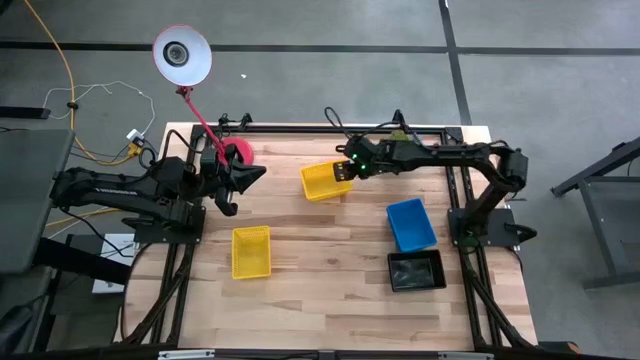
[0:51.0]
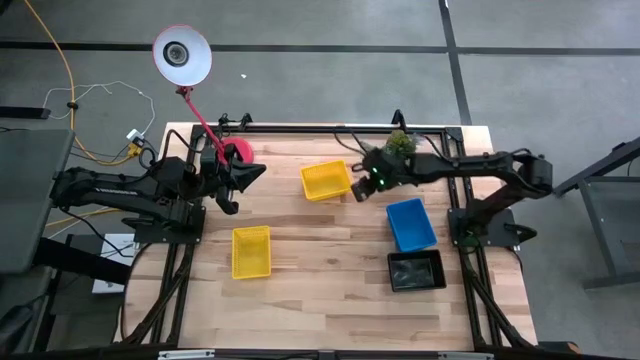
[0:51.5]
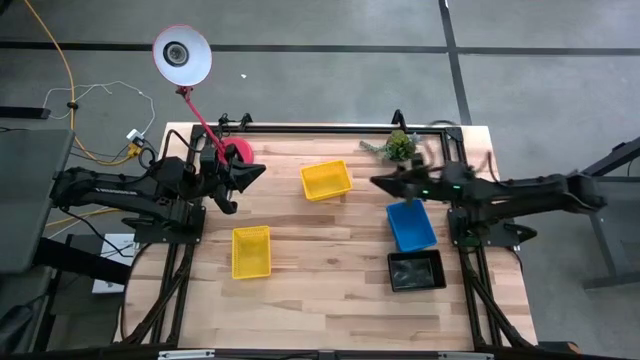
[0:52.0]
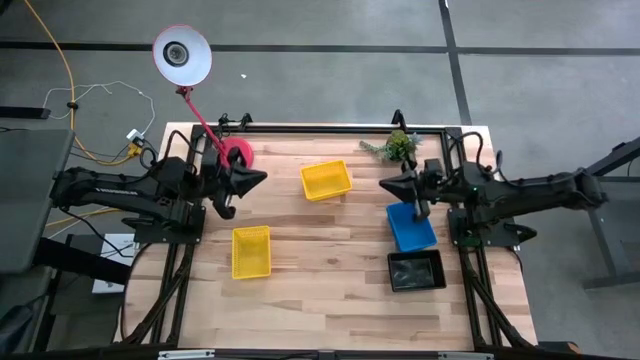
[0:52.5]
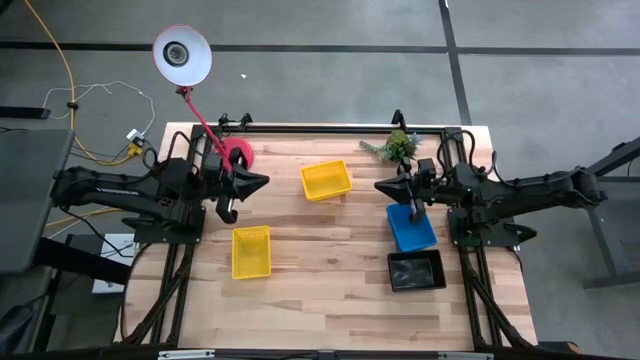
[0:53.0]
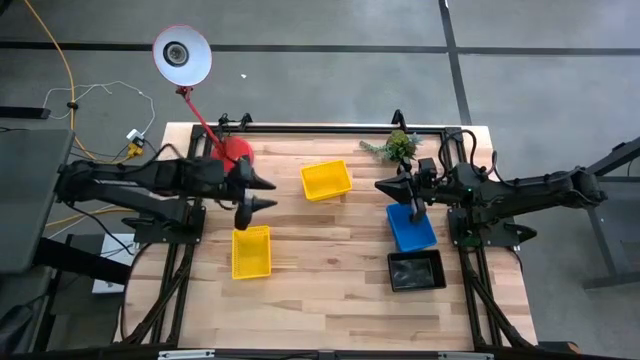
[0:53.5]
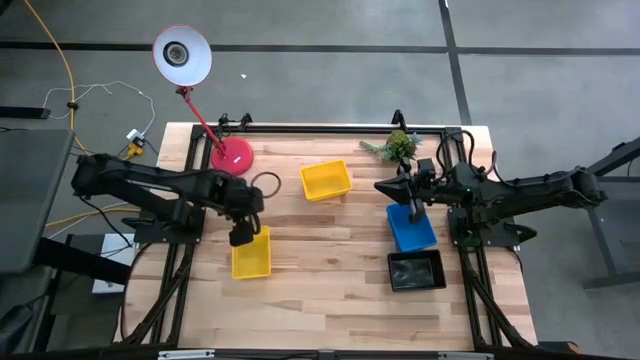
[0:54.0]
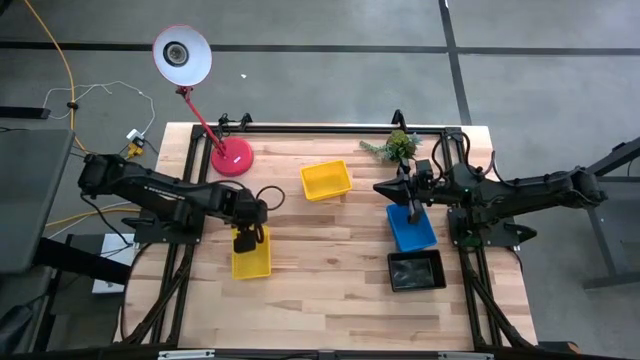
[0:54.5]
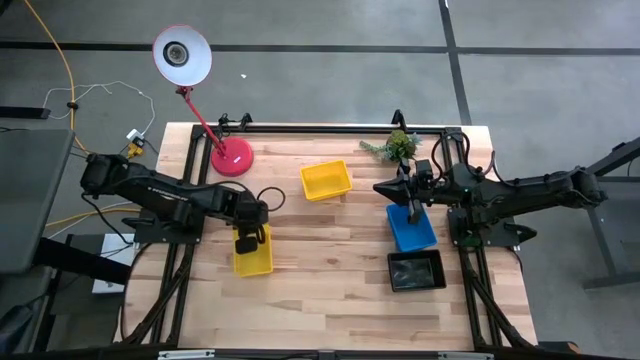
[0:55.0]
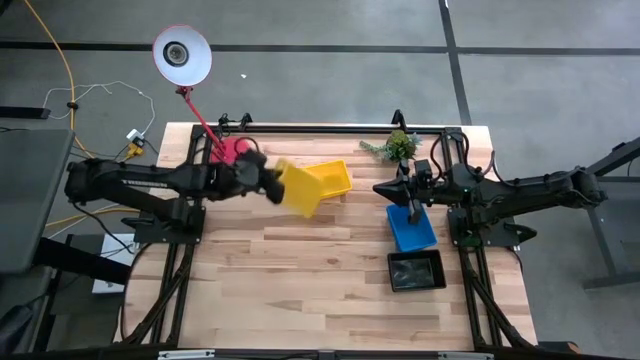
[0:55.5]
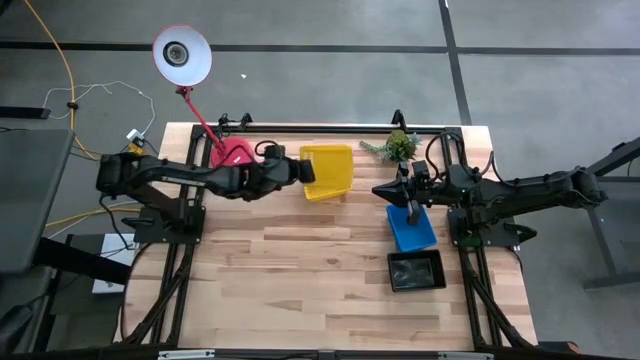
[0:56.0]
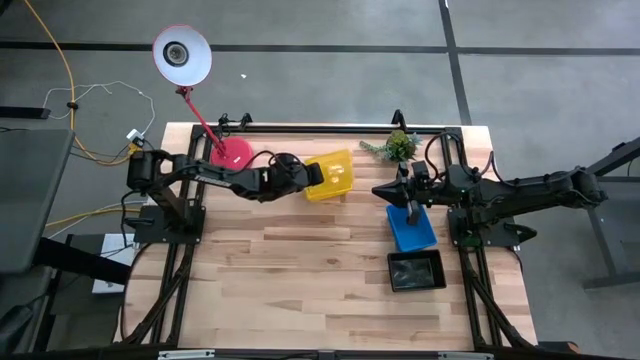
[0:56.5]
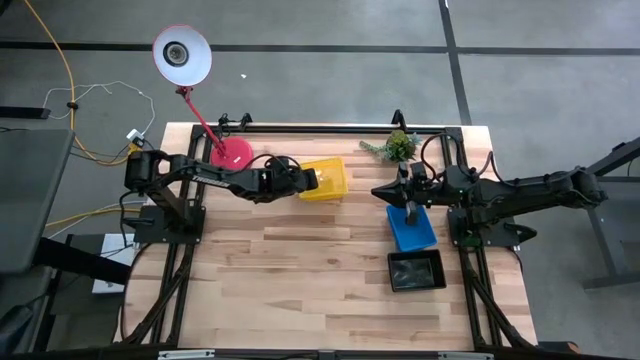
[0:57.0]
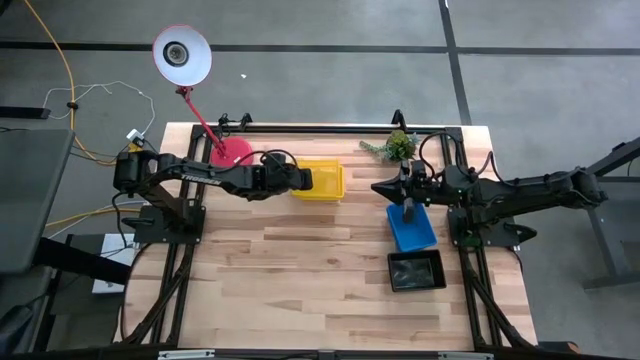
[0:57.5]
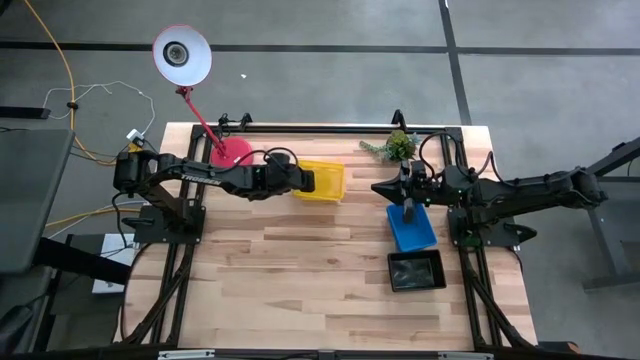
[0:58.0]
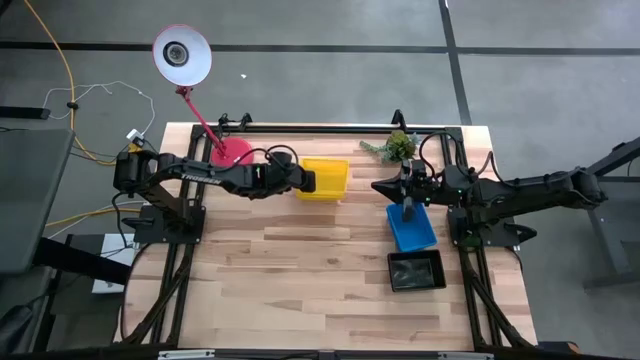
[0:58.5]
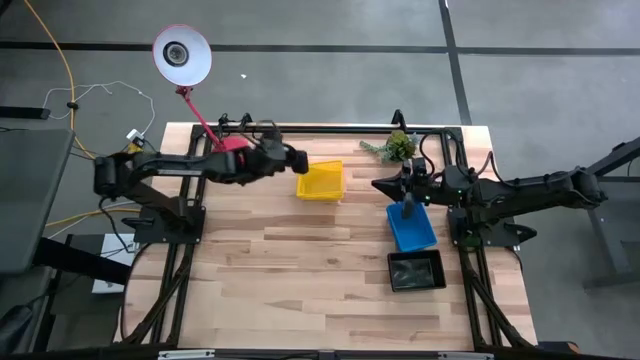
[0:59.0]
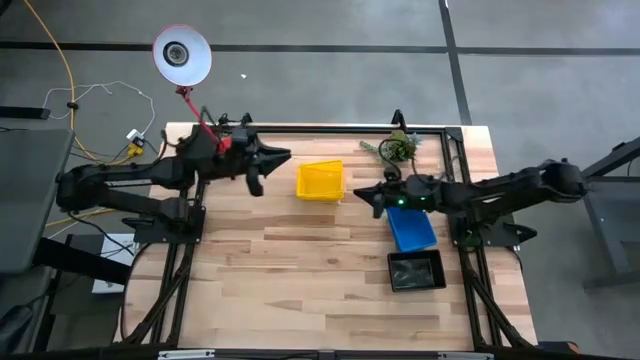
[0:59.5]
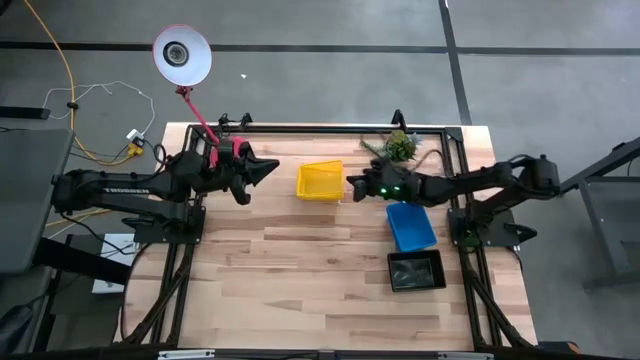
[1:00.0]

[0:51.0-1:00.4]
Stack the left yellow bin on the top stacked yellow bin

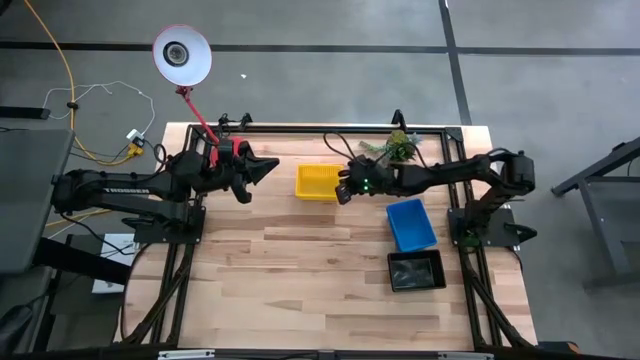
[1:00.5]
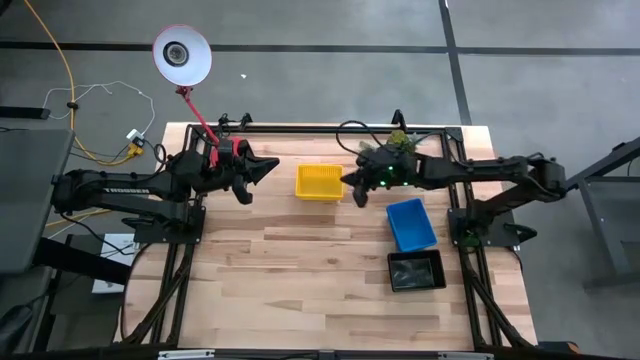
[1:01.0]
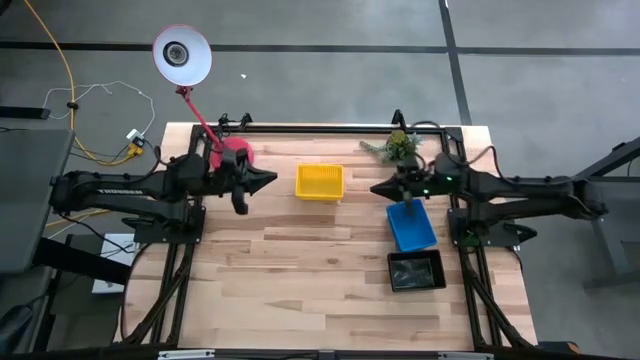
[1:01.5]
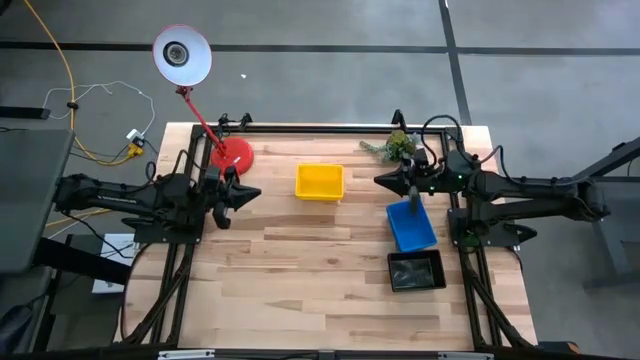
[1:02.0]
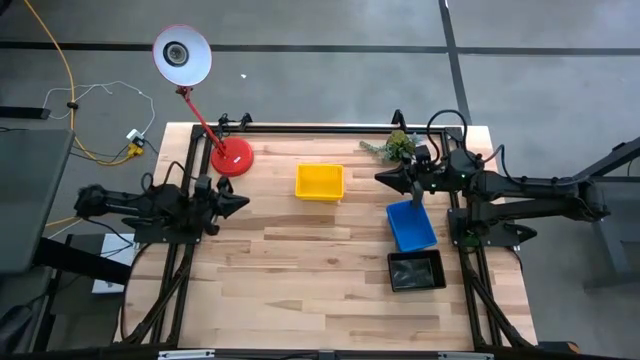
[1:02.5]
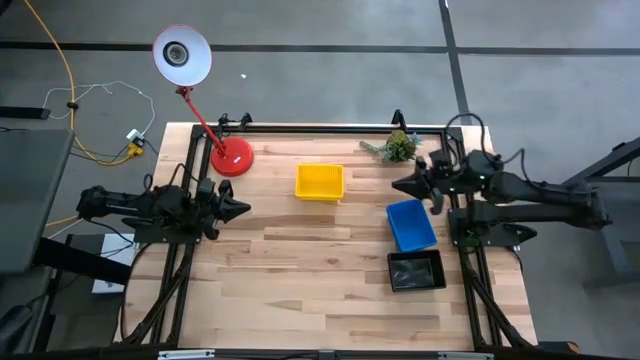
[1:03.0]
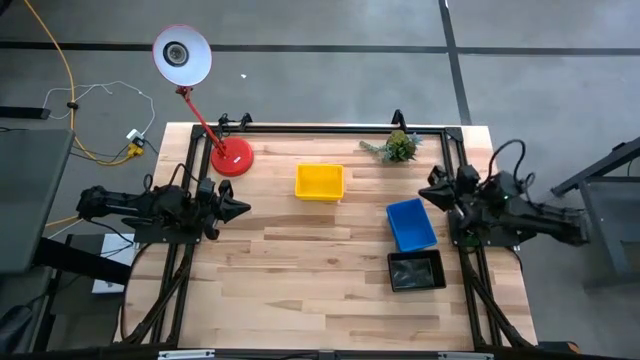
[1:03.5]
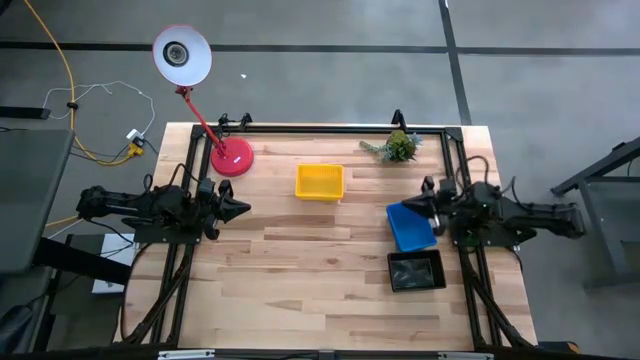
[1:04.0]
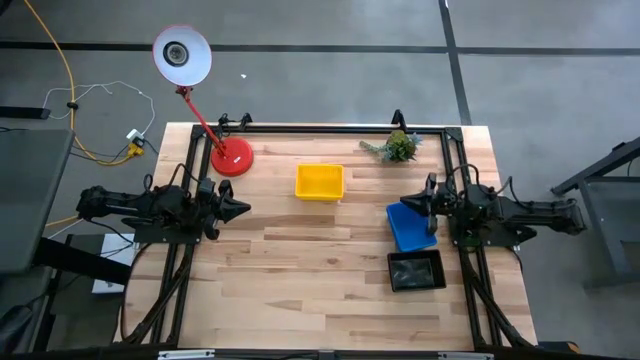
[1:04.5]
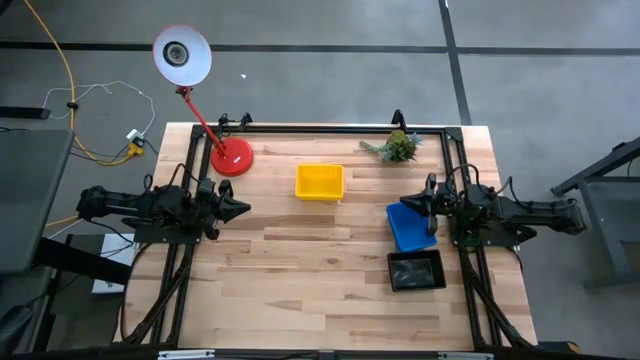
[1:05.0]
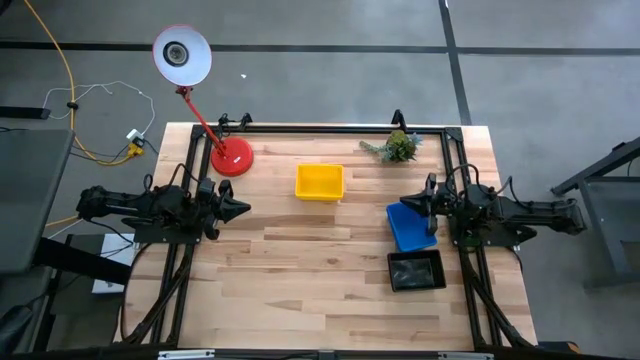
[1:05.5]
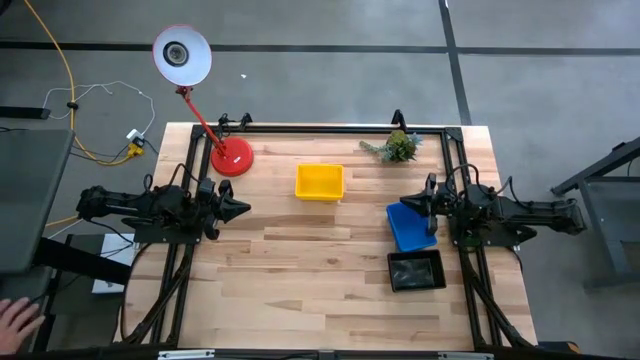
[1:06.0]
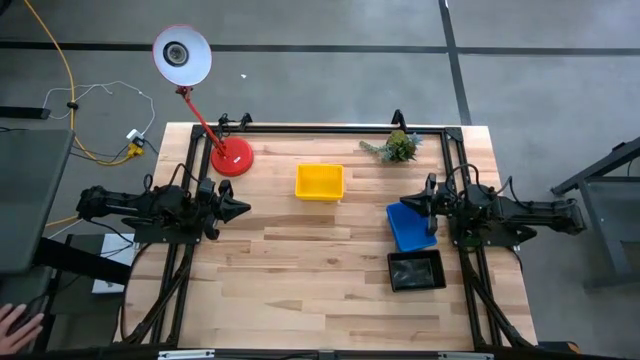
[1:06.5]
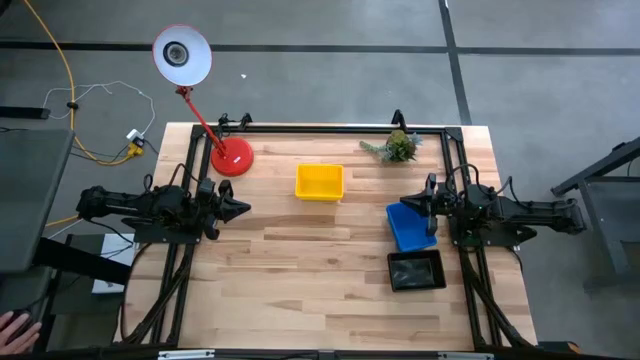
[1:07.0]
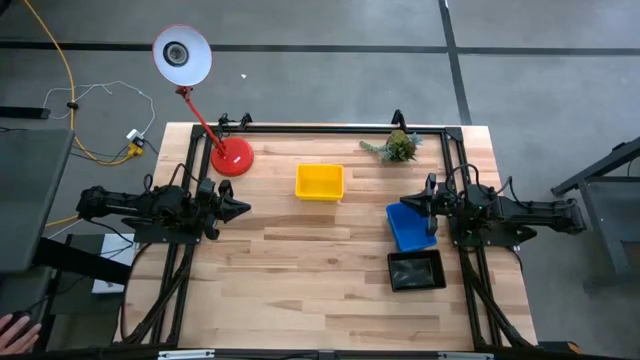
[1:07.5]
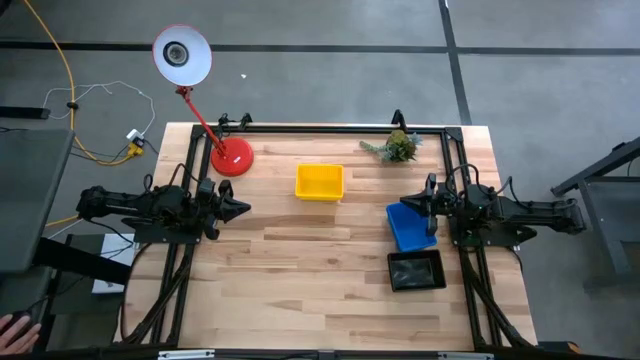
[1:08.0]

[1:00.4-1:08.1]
Return to Home Position
